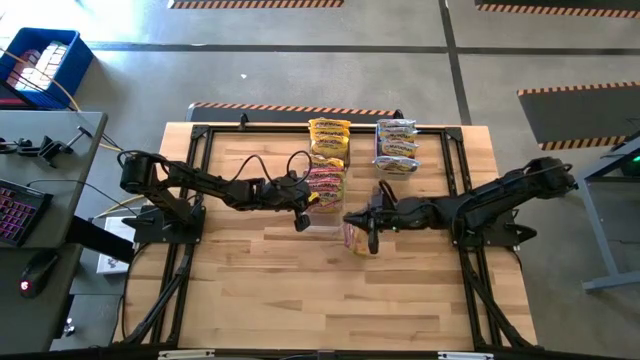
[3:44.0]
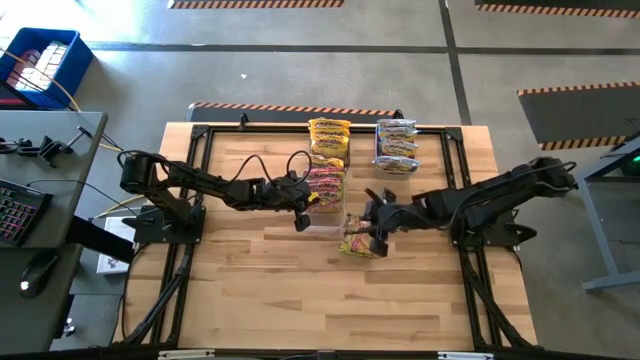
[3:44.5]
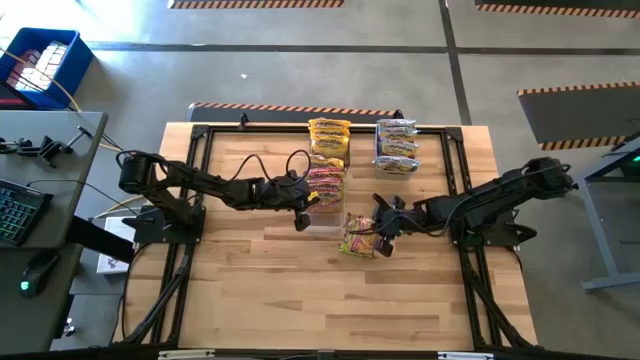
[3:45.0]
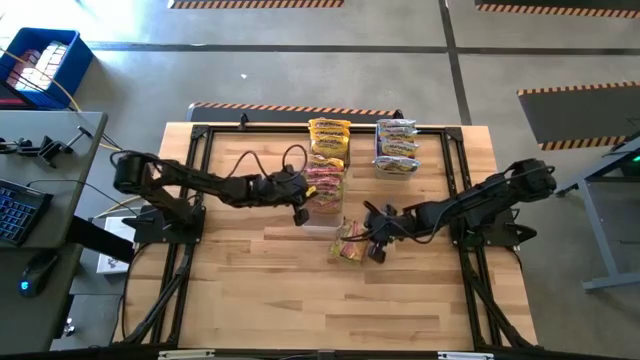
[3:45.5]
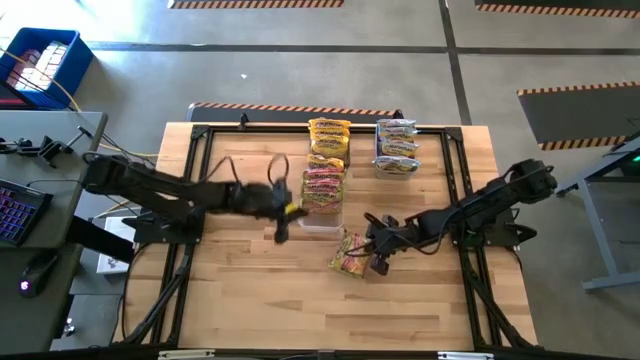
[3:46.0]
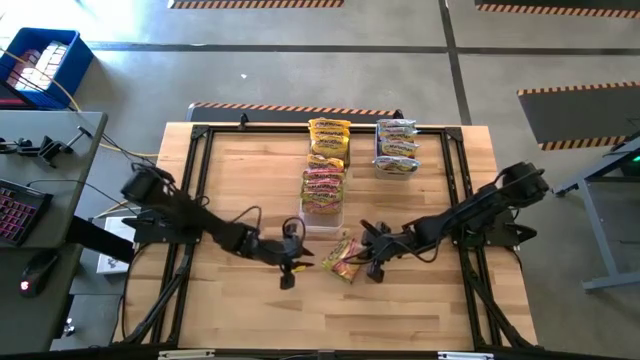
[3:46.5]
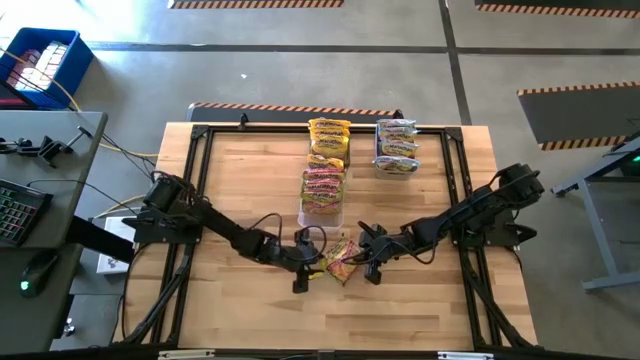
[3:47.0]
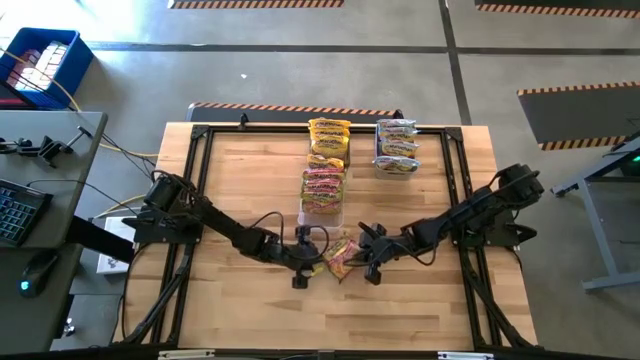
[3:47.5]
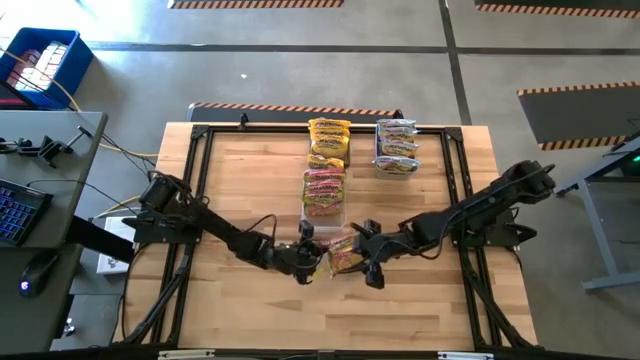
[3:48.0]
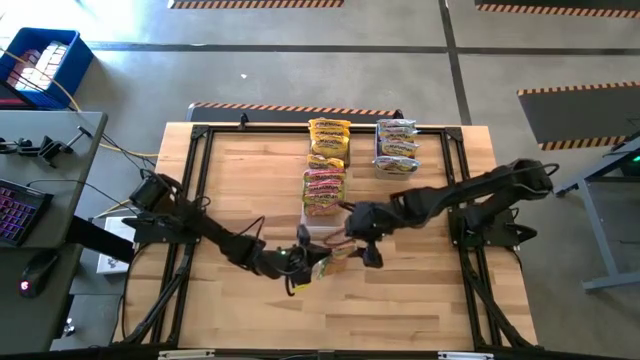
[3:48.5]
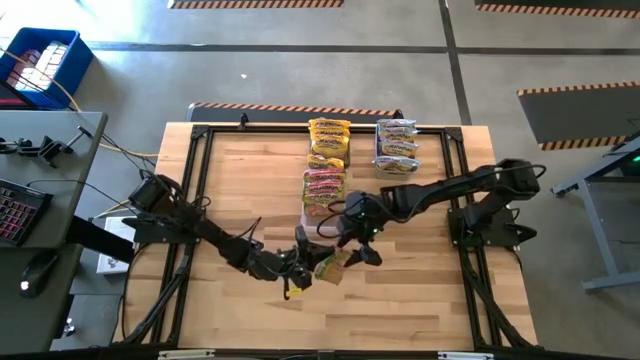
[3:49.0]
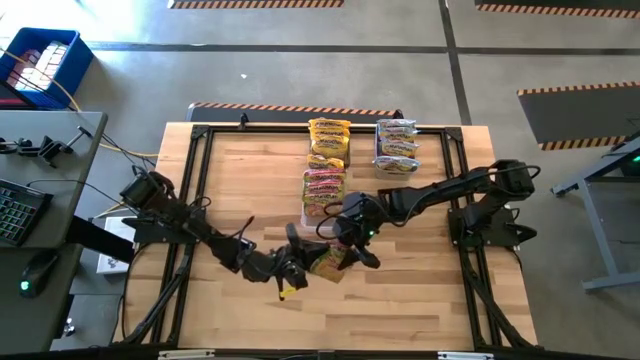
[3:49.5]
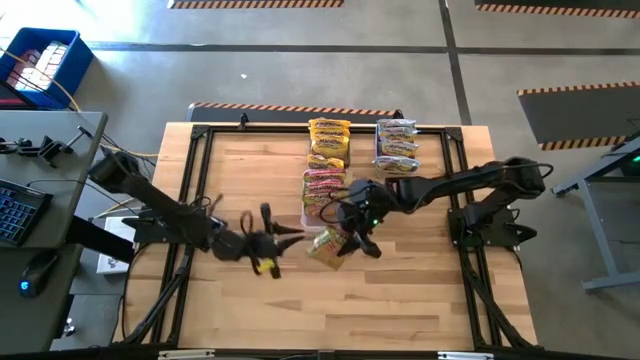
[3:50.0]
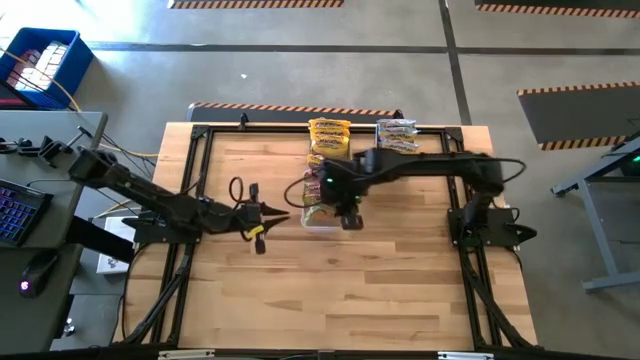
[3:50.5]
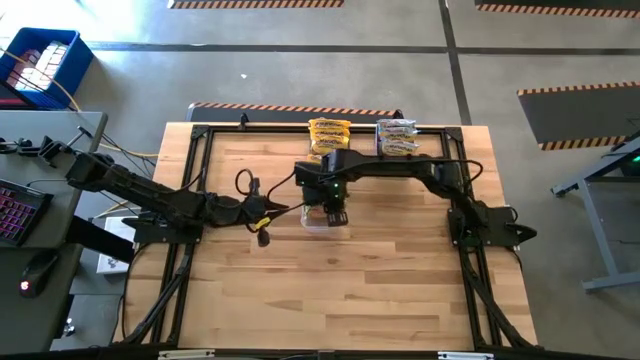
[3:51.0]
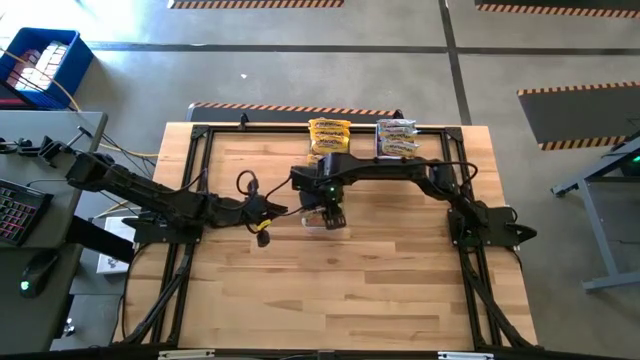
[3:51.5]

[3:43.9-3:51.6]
Task: Sort Maruchan noodles
Put the green noodle pack into the transparent bin

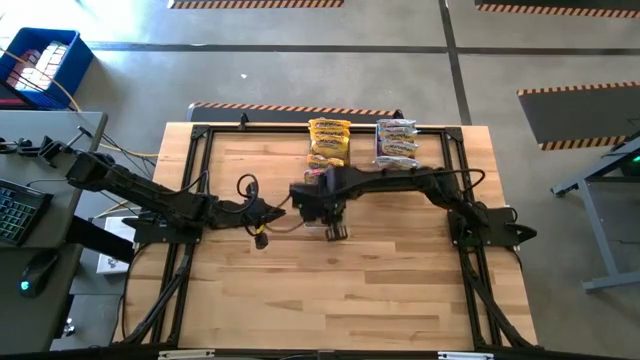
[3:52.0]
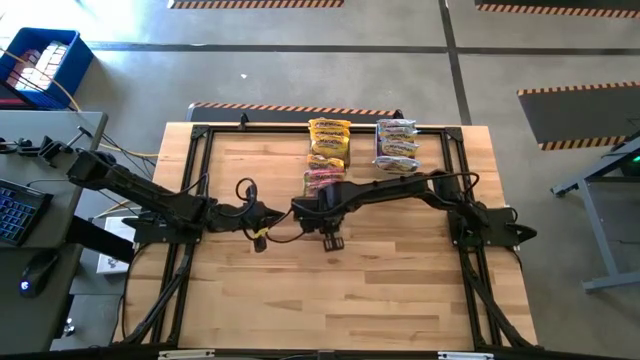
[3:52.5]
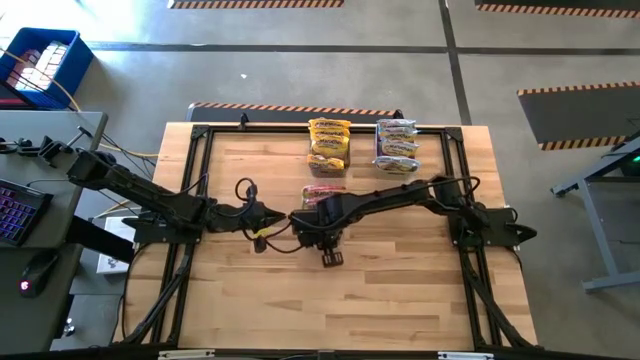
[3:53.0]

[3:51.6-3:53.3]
Adjust the transparent bin

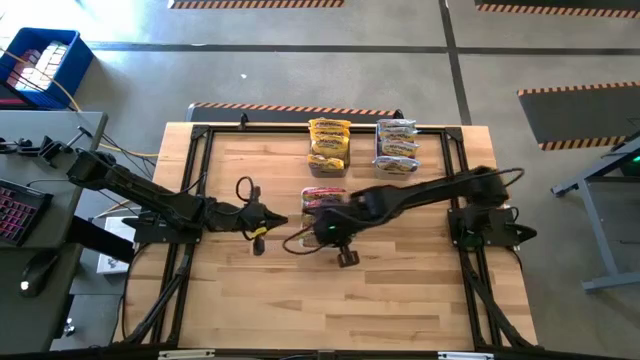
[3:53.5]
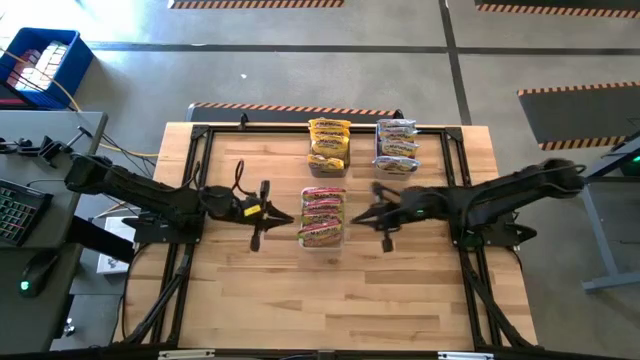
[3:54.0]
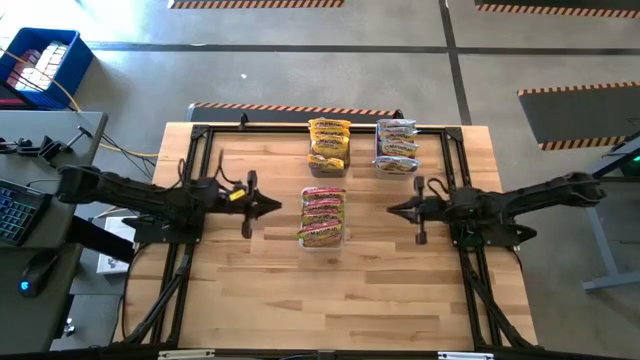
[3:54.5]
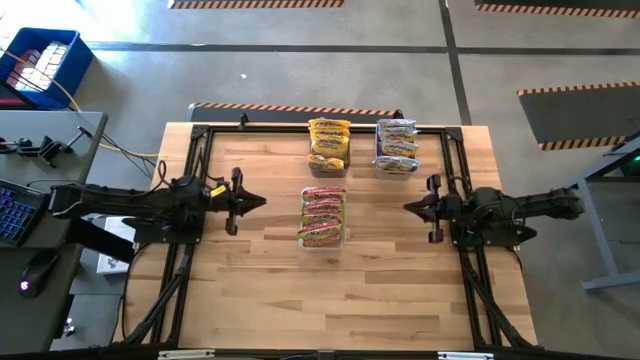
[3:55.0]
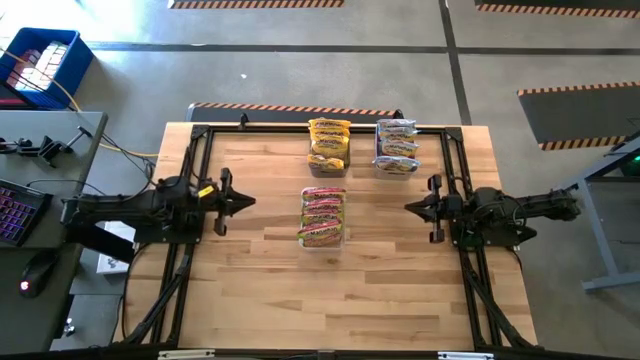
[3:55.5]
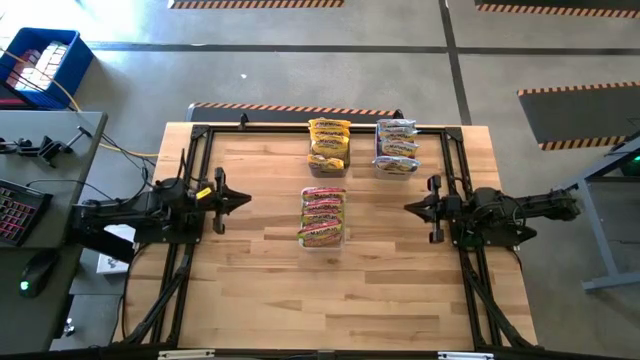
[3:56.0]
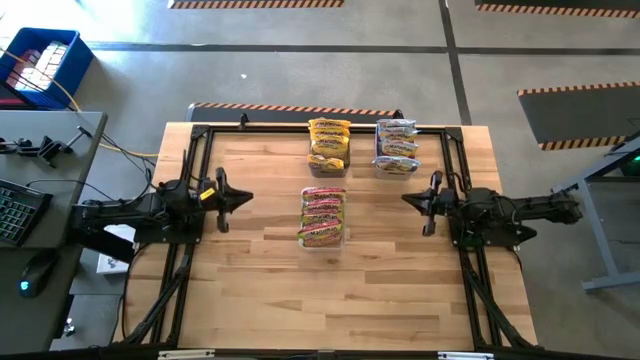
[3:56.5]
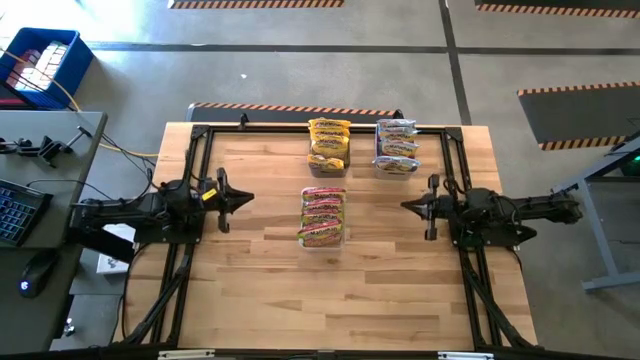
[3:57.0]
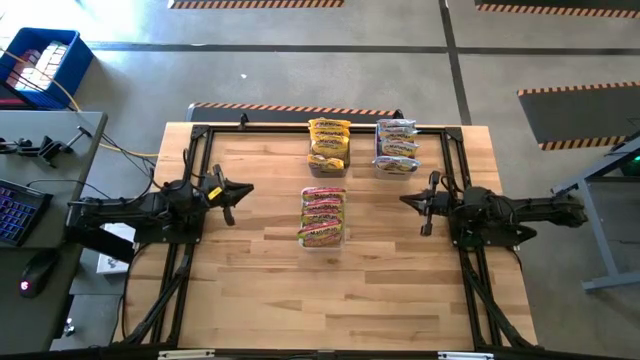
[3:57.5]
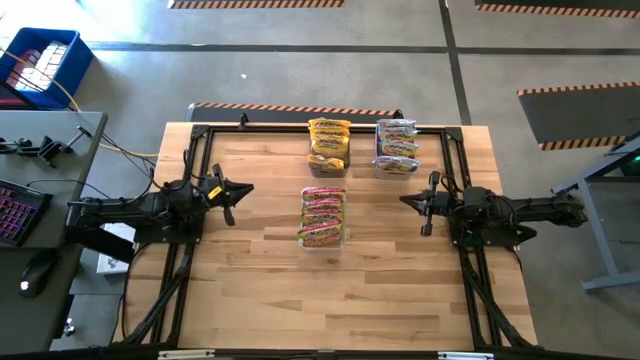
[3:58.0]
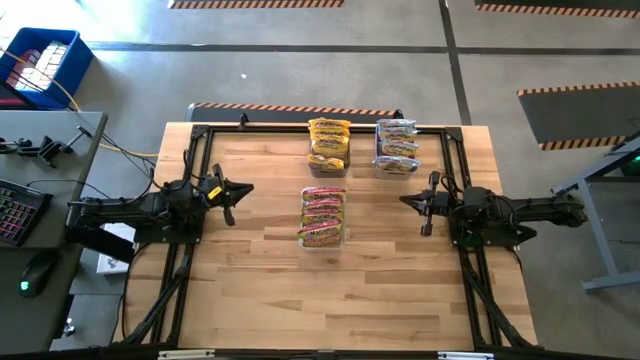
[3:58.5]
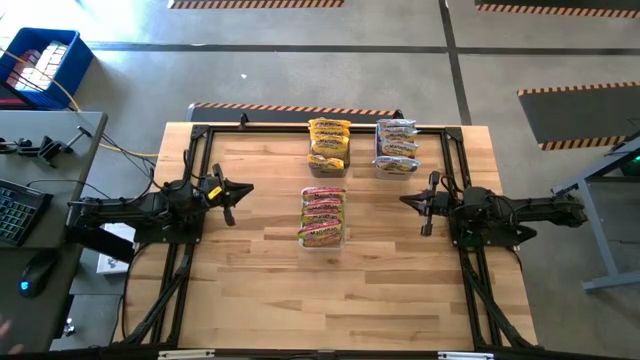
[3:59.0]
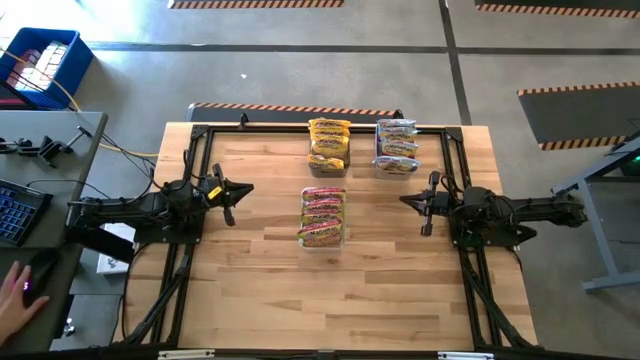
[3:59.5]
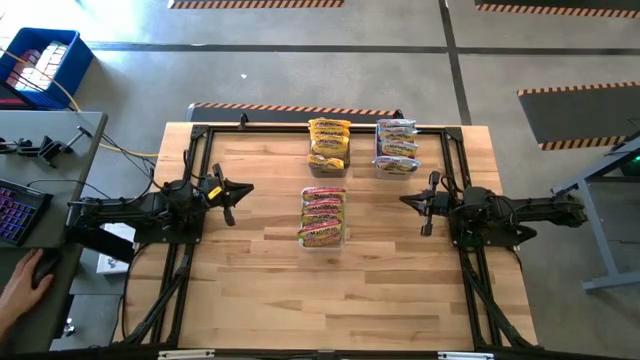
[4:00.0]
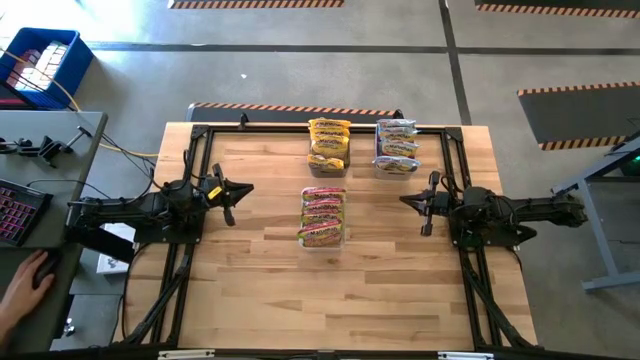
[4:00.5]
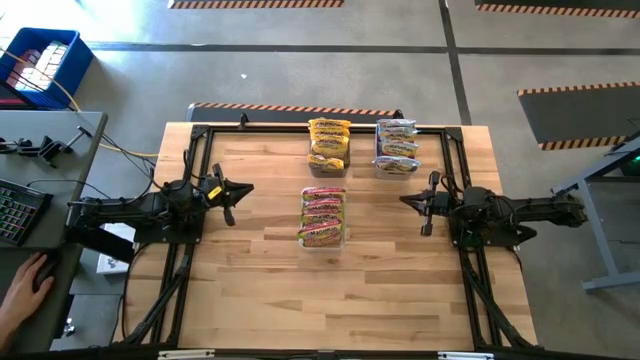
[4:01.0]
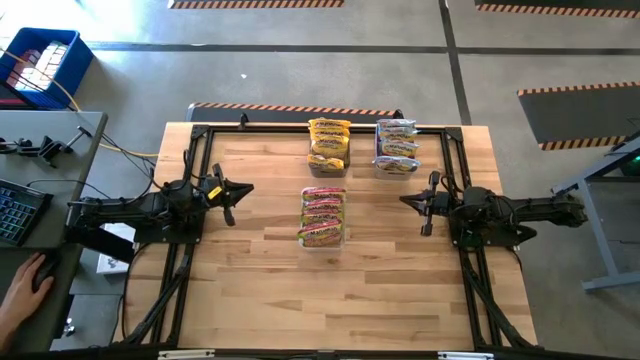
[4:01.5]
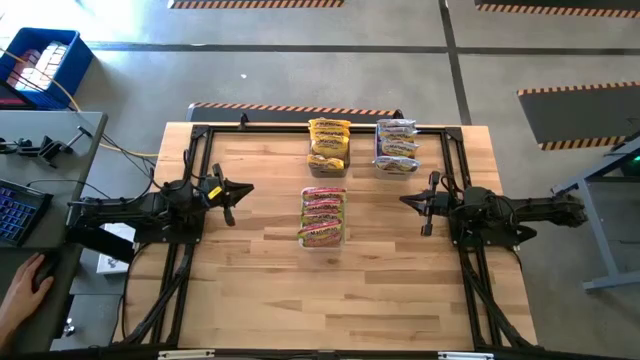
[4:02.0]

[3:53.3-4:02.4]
Return to Home Position

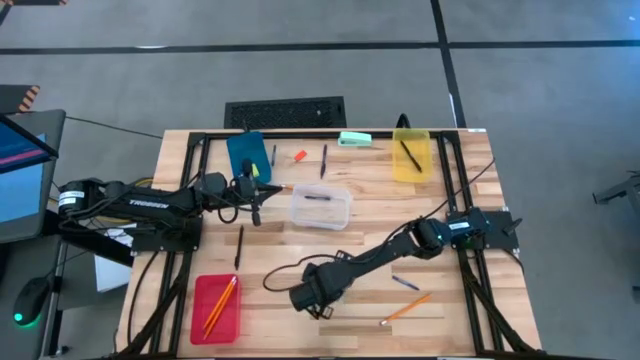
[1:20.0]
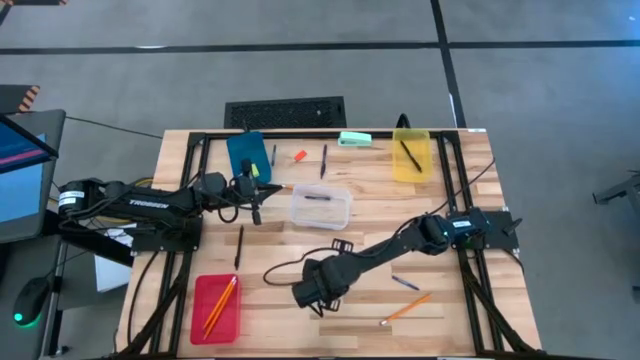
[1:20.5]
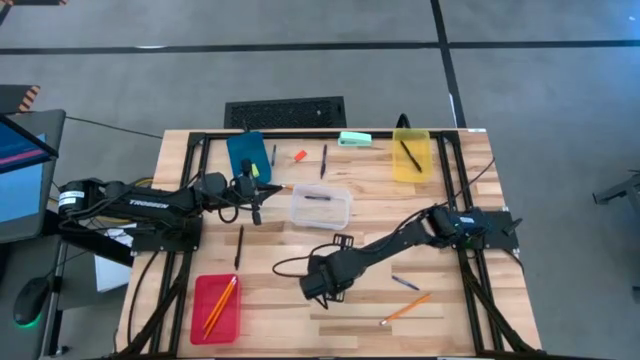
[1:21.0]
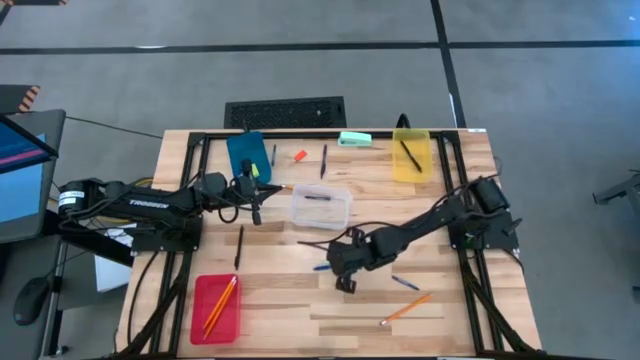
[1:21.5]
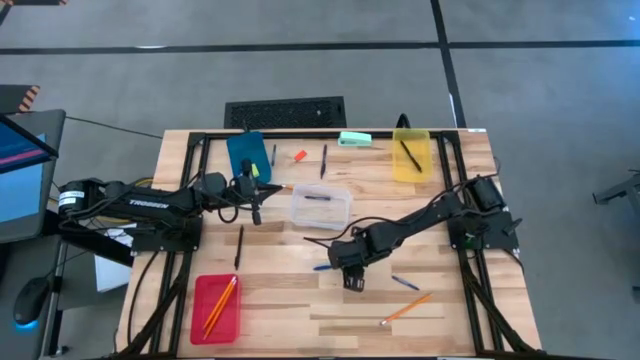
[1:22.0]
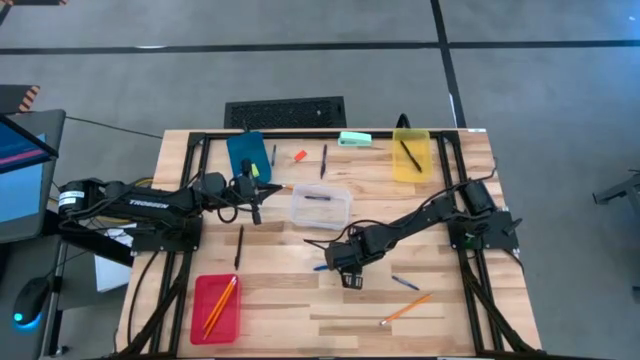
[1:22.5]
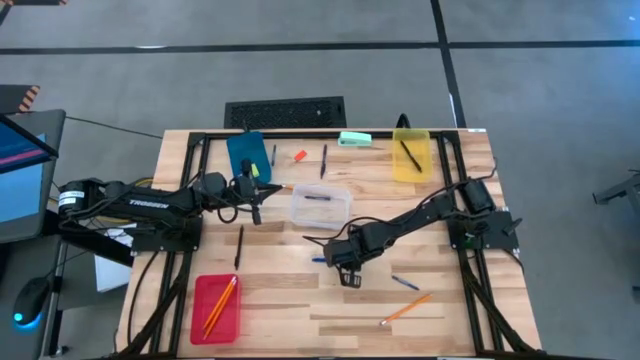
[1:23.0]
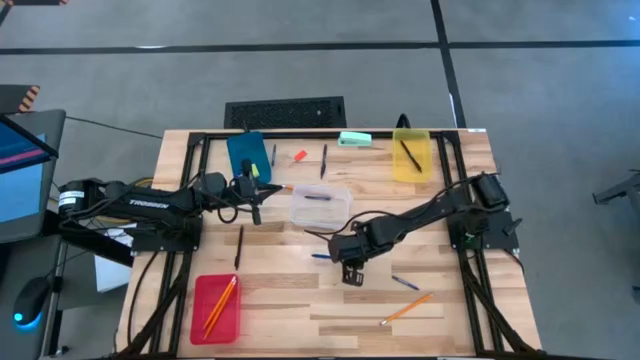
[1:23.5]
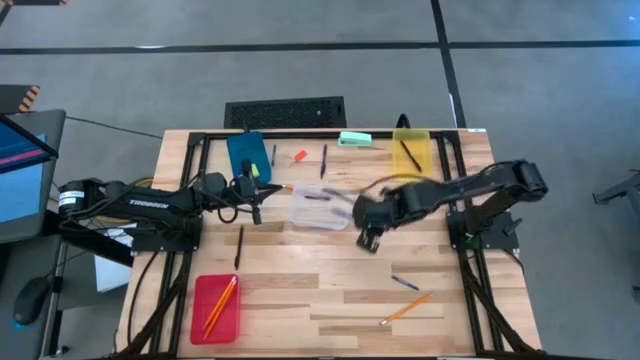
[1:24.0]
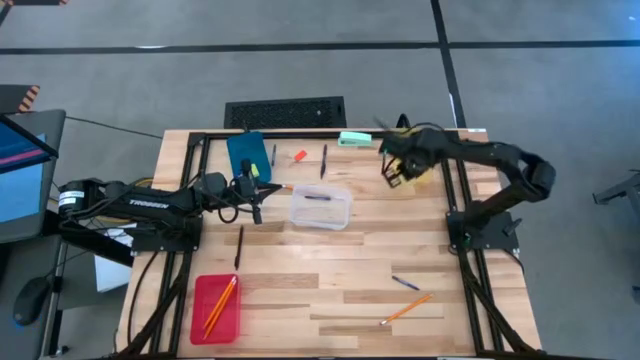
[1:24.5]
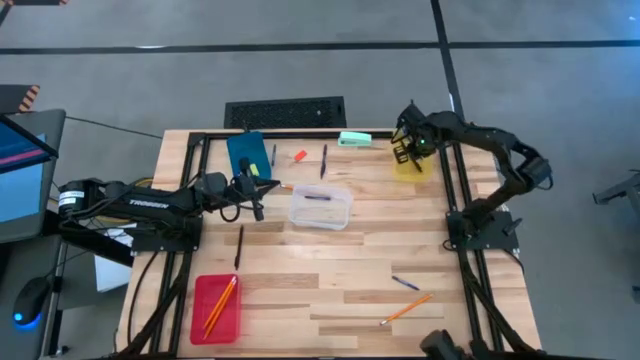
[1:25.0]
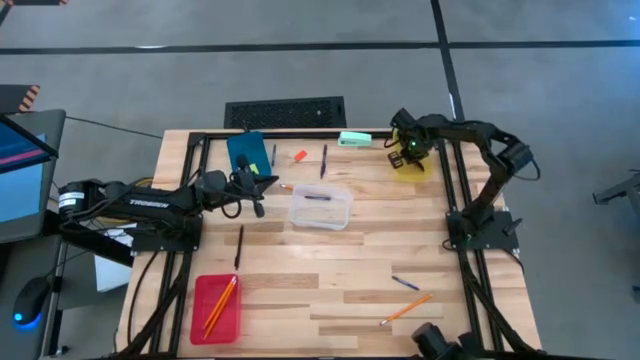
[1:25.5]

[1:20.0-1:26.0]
Task: Sort crayons/erasers/pens/pencils in bins
Put the blue pen into the yellow bin
